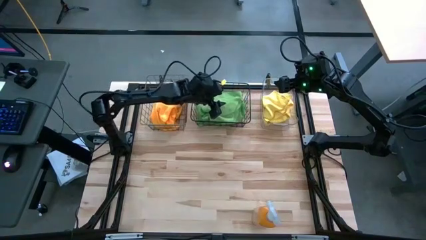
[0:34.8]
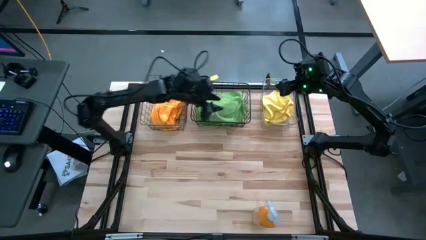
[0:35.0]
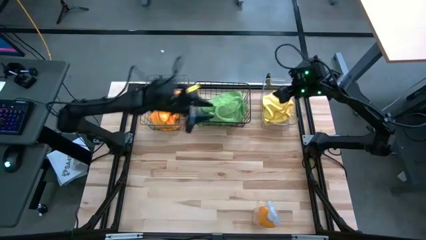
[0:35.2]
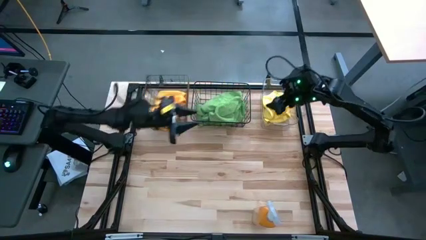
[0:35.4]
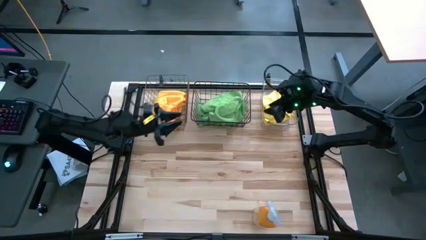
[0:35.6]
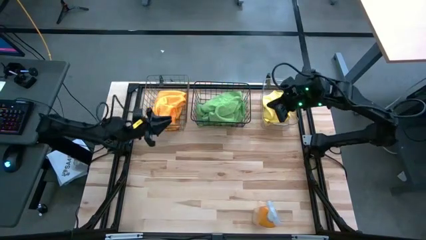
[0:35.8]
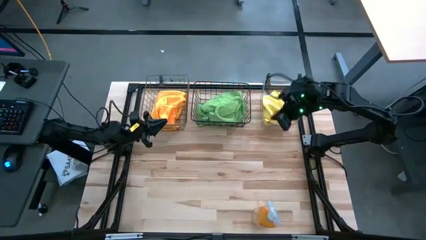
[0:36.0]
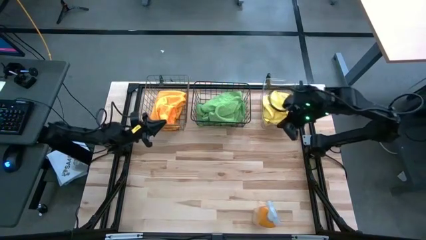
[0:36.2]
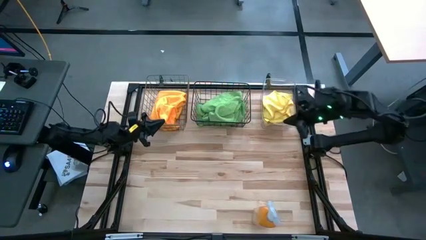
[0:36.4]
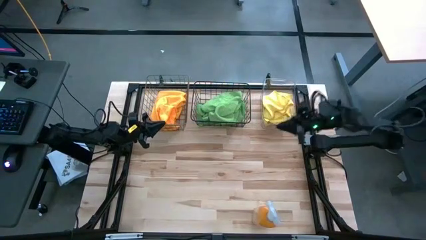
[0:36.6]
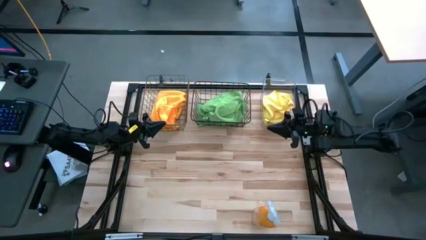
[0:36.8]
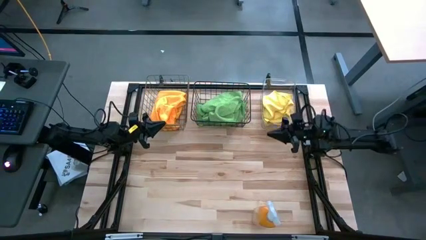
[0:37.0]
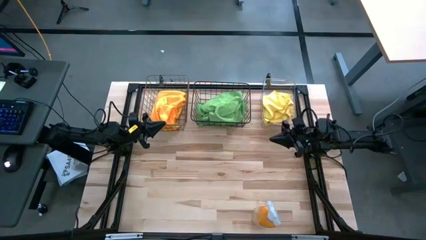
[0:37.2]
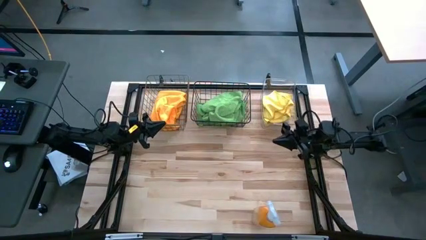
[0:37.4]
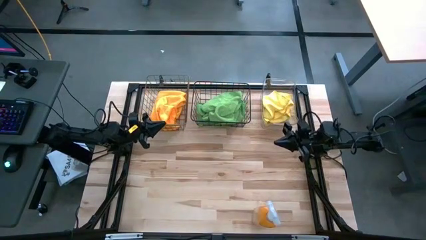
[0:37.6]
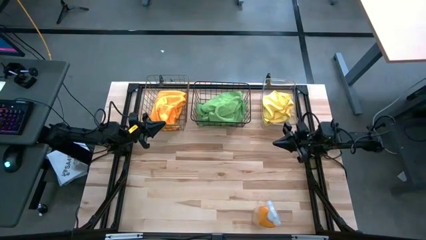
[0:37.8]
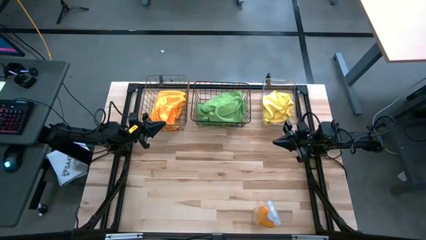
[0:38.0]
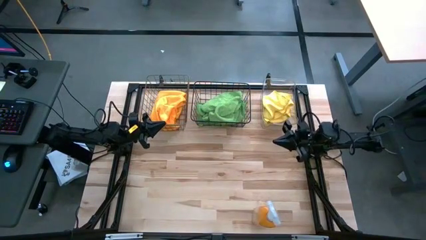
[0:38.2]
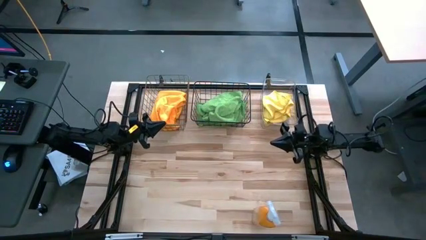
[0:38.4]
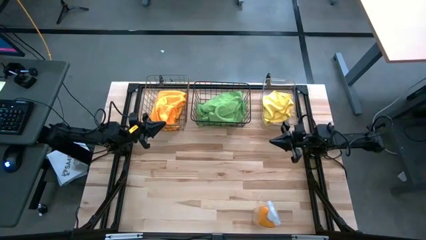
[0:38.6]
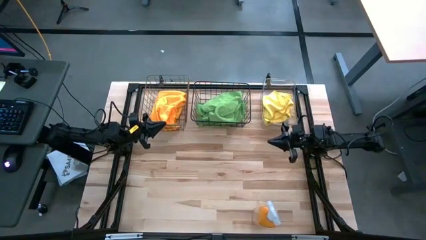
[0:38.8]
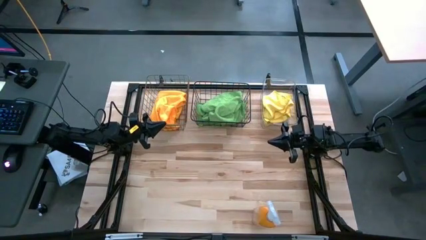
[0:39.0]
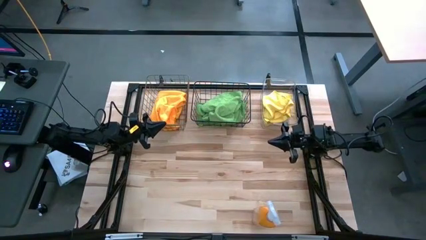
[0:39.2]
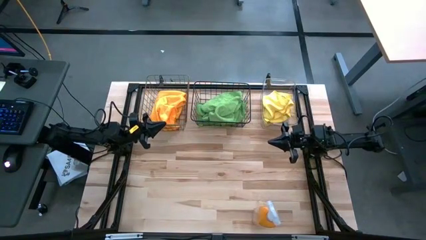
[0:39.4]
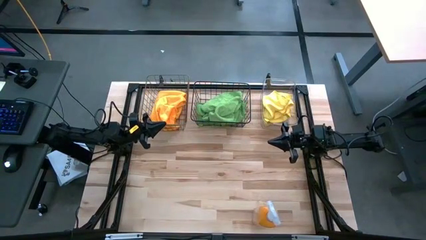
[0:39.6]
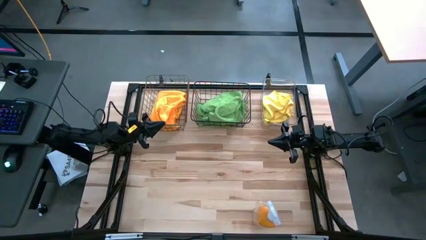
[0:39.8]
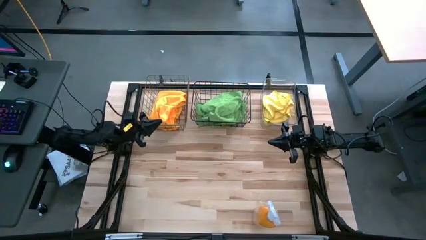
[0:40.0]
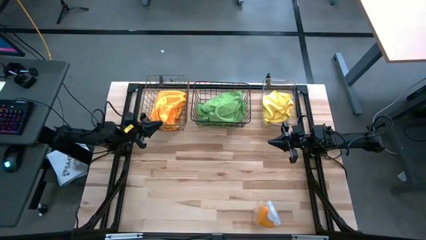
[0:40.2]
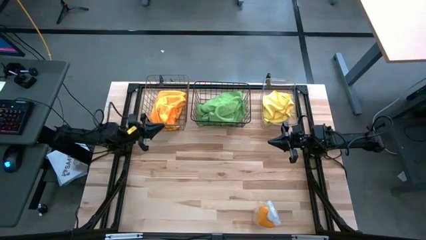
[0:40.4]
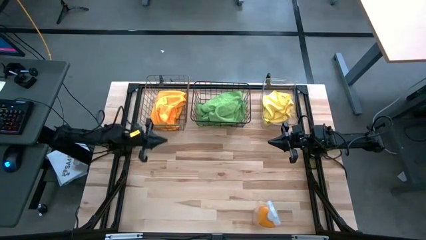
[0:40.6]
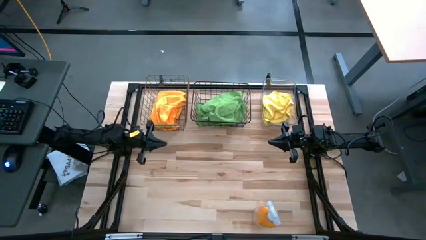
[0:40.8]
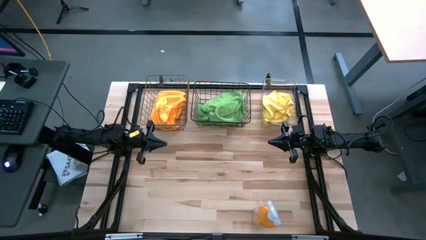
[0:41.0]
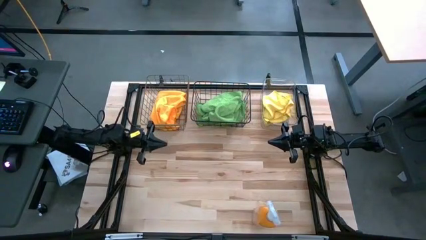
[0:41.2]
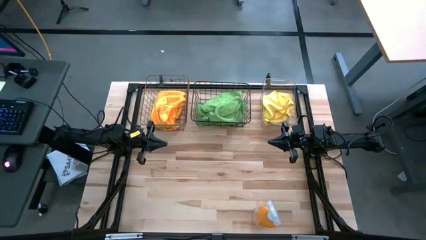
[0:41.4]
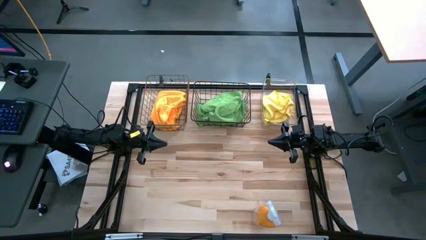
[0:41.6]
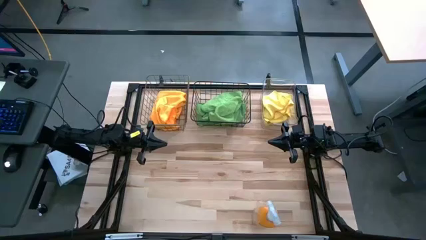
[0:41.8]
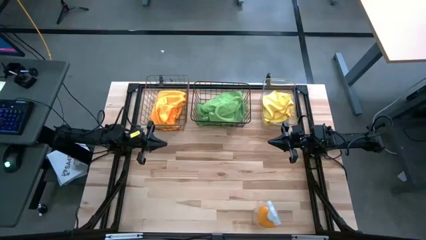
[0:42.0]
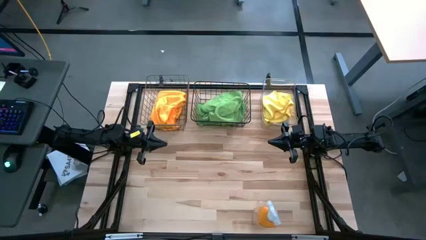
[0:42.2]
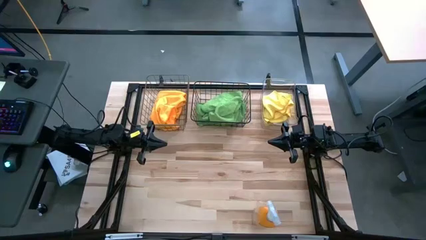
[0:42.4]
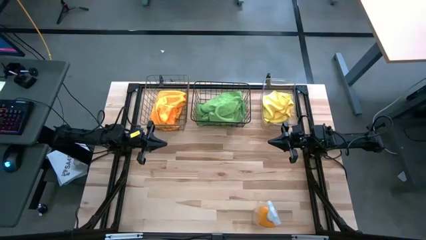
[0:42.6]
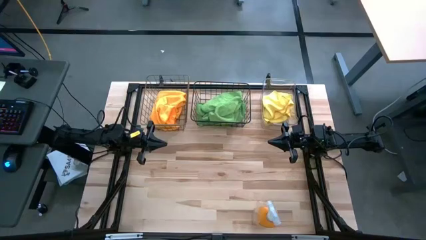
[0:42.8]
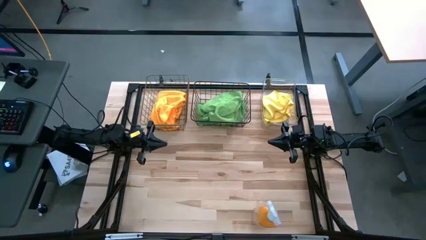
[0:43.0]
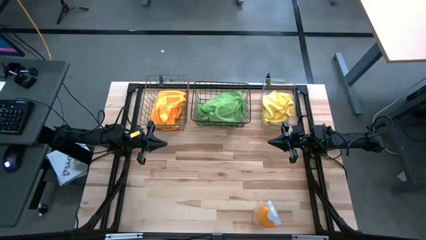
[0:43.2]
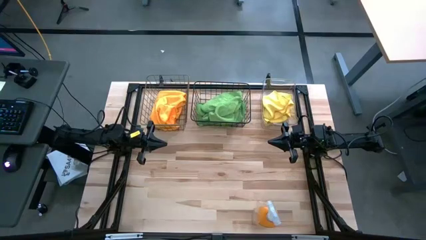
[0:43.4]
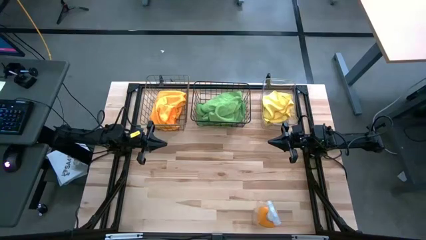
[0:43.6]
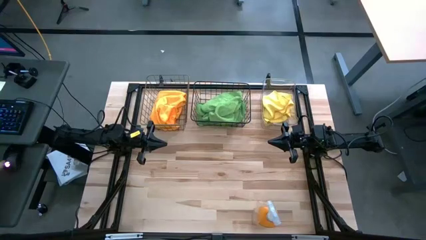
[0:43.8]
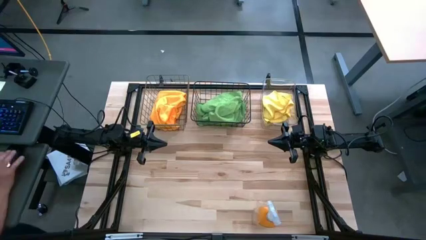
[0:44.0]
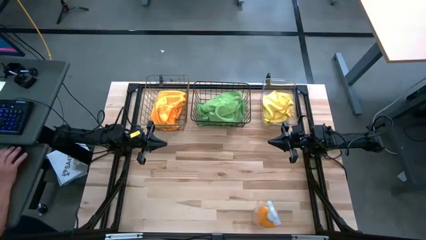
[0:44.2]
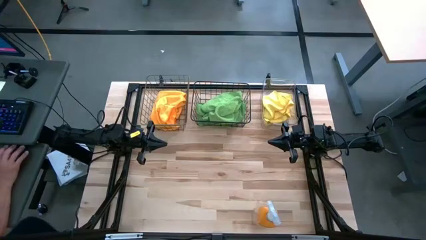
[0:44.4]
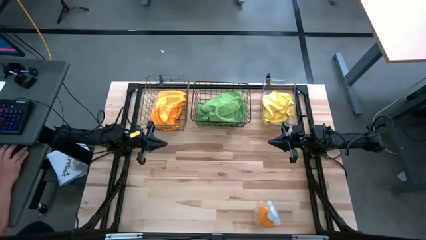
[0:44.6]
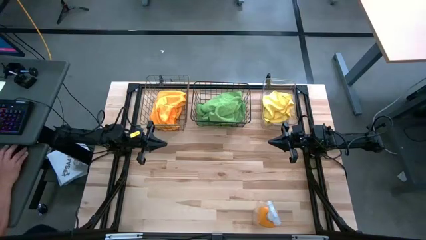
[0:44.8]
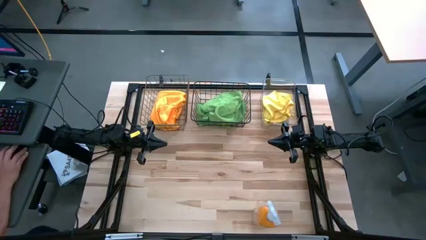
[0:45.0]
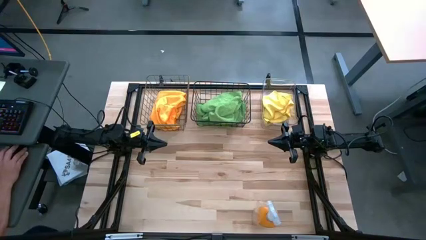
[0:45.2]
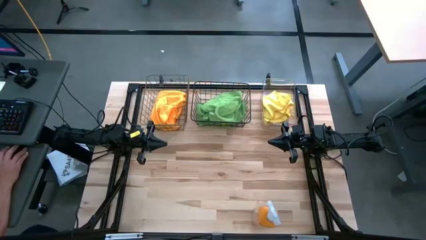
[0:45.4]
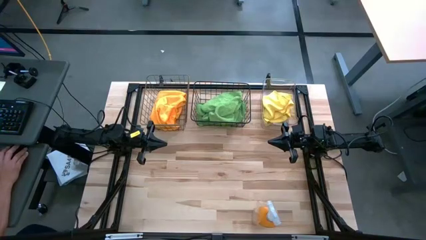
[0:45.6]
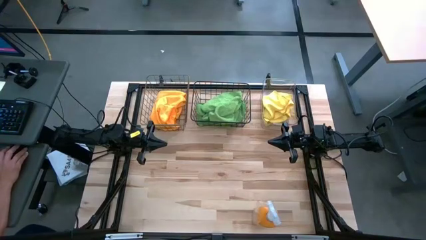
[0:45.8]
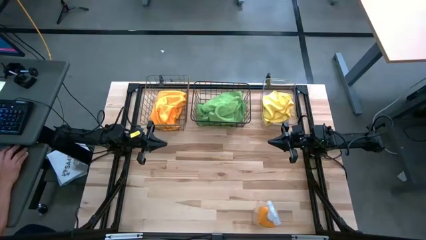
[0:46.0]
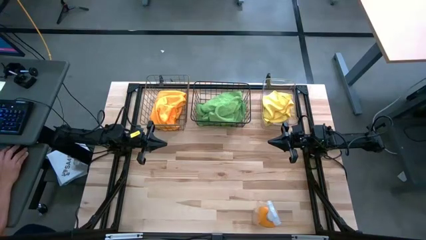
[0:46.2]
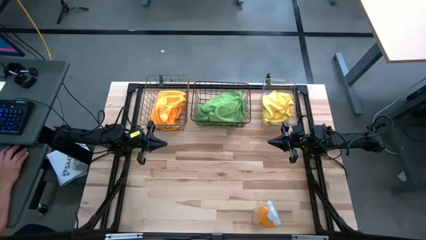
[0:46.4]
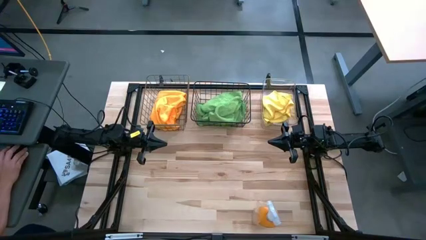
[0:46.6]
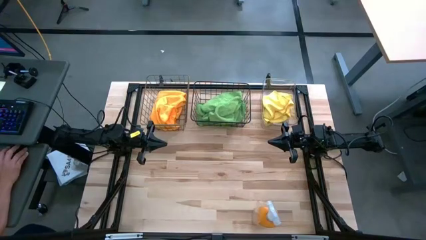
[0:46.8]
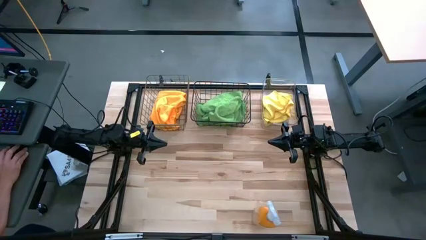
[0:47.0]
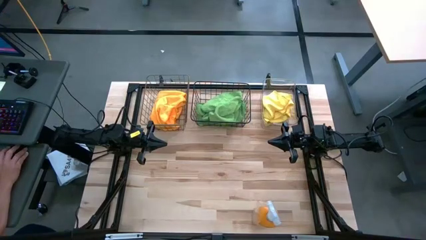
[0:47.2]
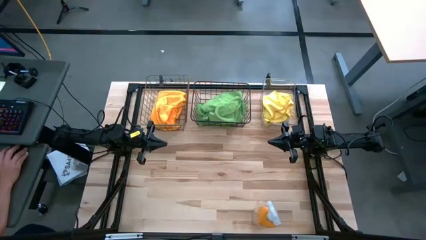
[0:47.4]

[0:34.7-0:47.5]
Task: Sort microfiber towel by color & place in baskets
Return to Home Position

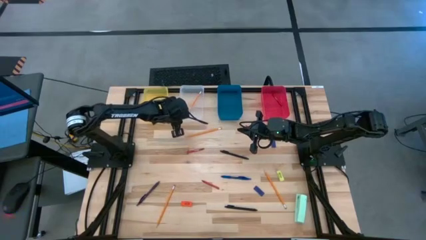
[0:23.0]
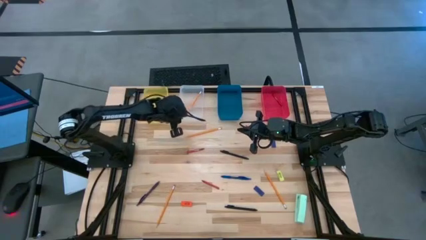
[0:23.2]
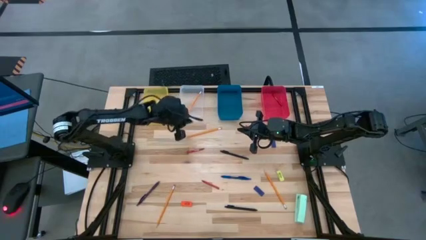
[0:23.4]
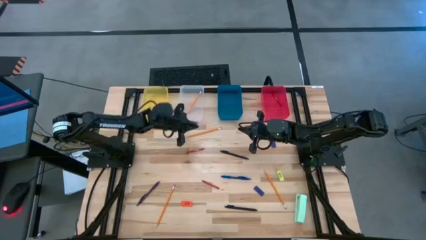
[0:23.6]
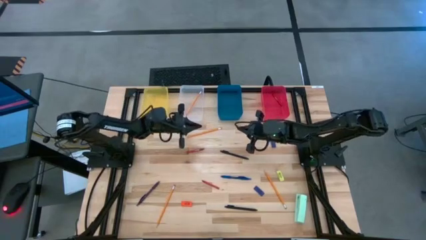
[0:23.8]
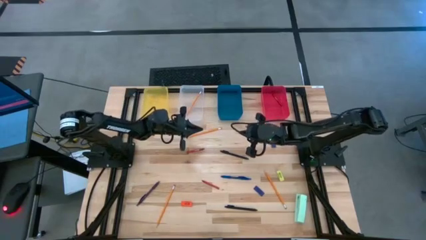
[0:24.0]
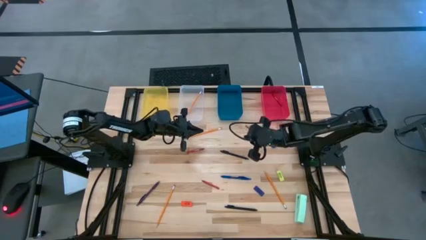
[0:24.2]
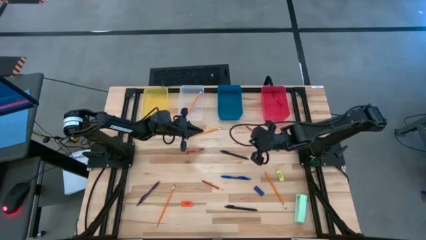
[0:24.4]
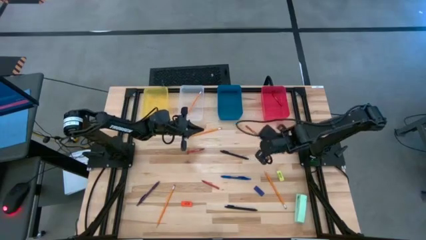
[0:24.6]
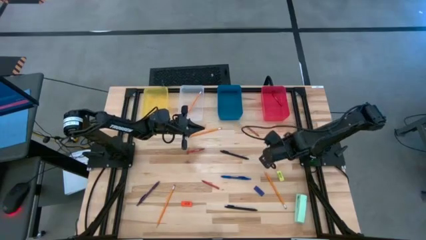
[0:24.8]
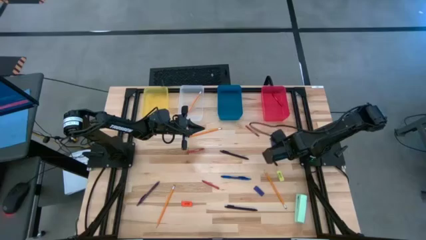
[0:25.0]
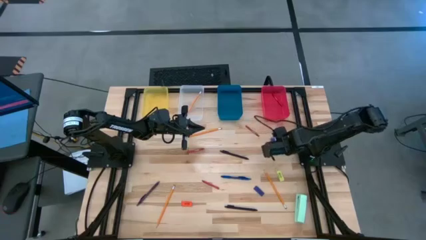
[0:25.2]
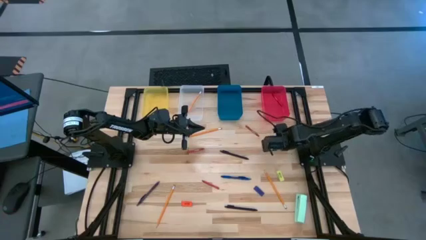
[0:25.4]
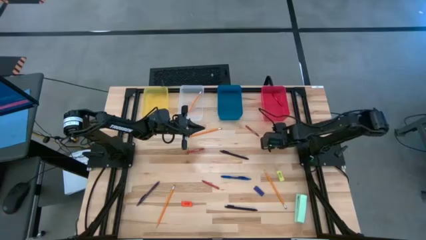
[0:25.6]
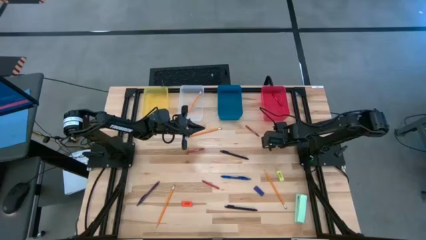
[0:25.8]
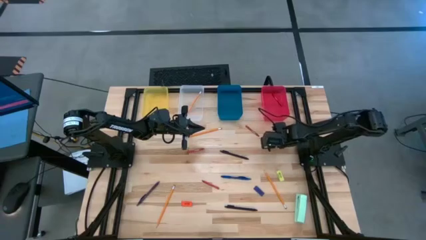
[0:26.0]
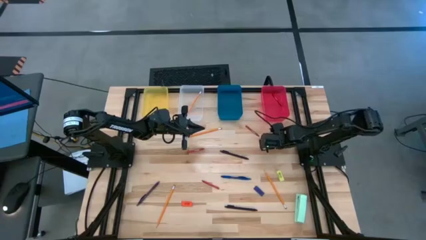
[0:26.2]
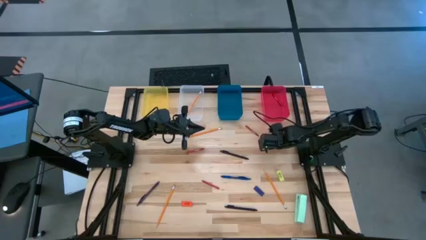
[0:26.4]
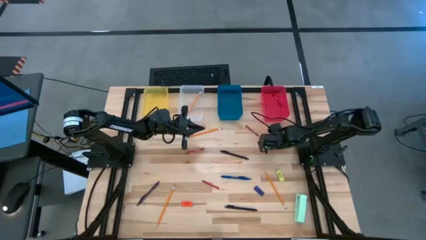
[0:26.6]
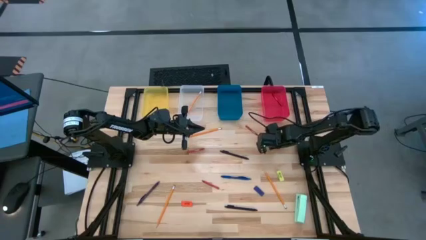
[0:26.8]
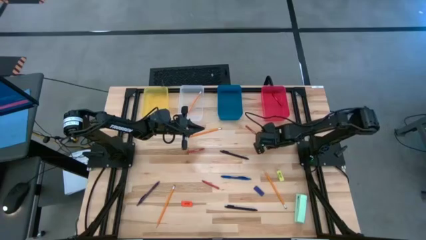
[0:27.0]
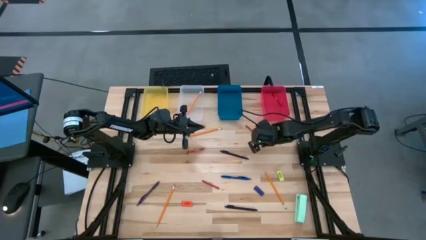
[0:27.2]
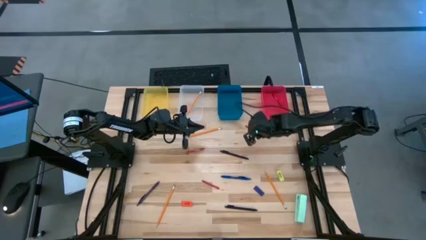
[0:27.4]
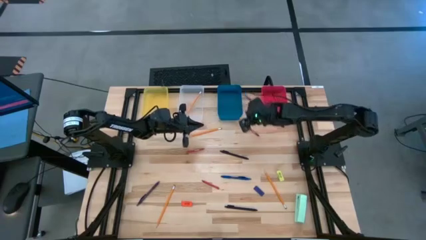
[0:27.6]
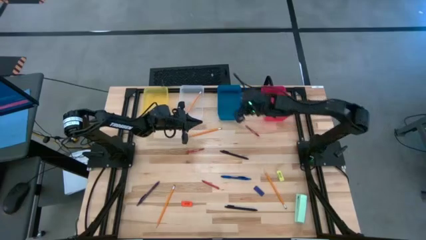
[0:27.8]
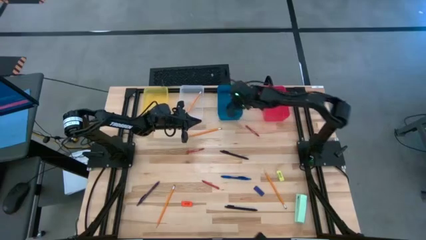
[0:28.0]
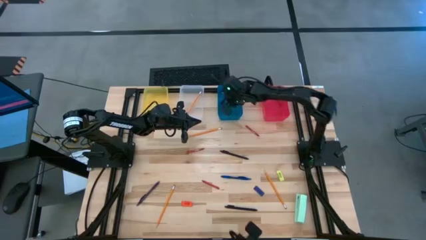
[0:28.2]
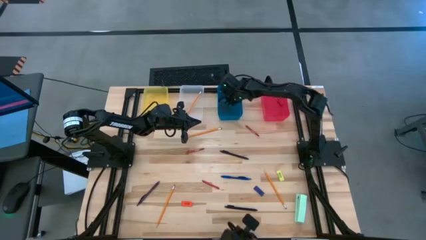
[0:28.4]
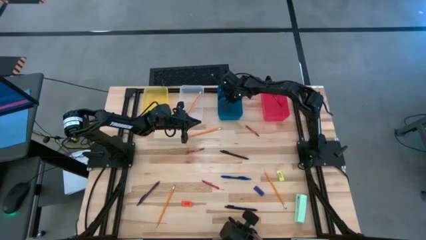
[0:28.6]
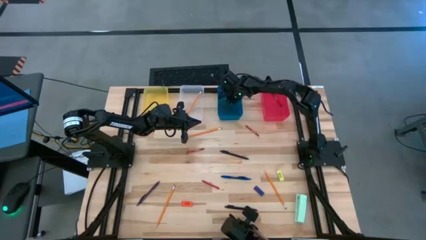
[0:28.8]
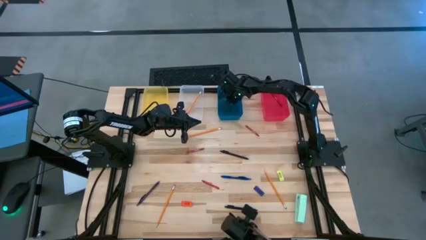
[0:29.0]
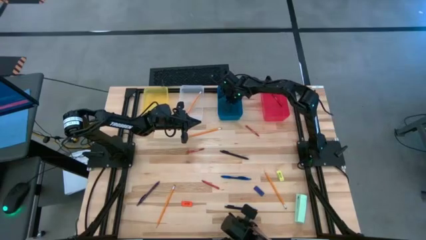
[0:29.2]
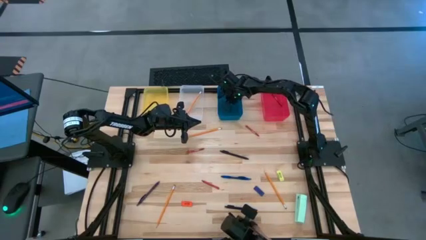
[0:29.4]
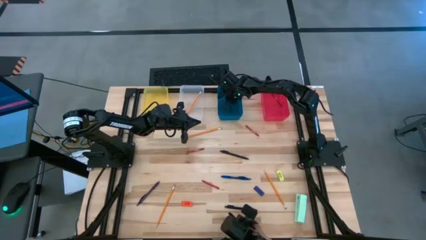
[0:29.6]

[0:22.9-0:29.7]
Task: Sort crayons/erasers/pens/pencils in bins
Put the blue eraser into the blue bin
